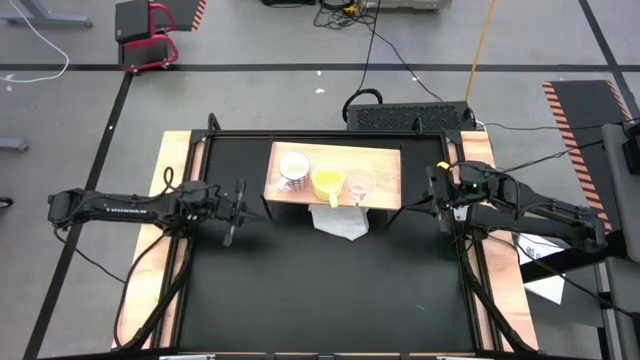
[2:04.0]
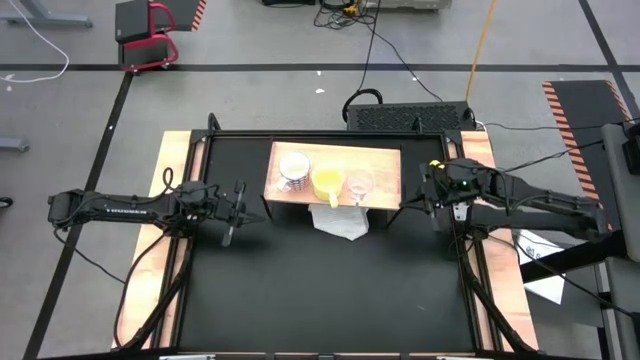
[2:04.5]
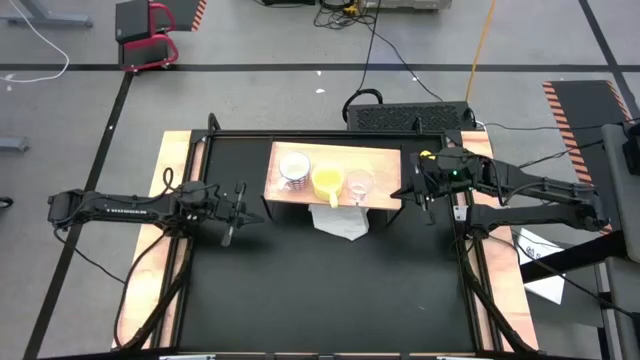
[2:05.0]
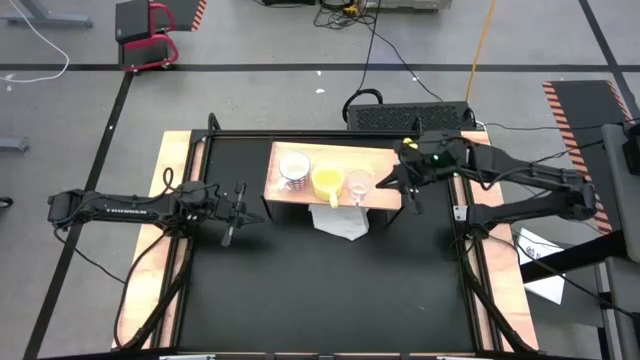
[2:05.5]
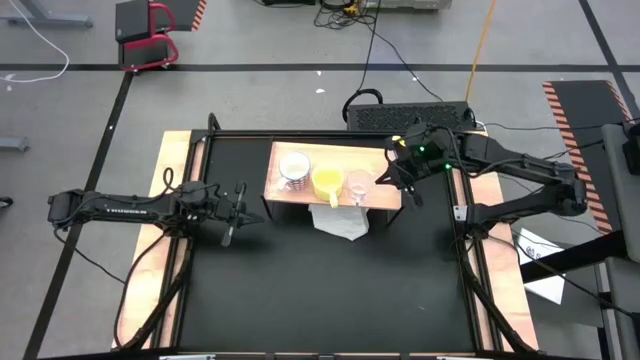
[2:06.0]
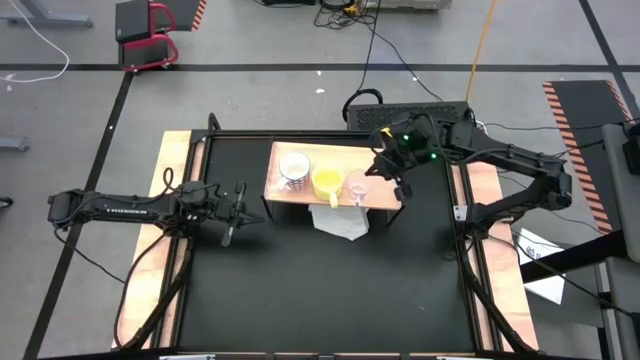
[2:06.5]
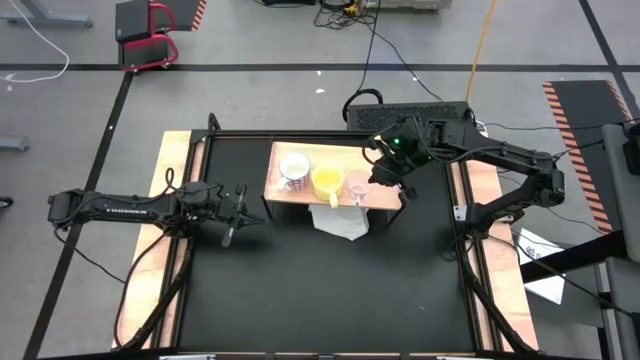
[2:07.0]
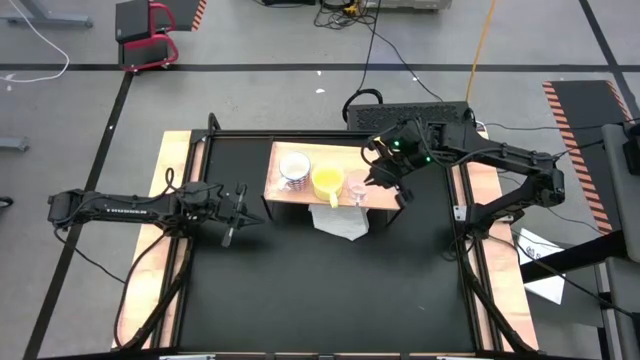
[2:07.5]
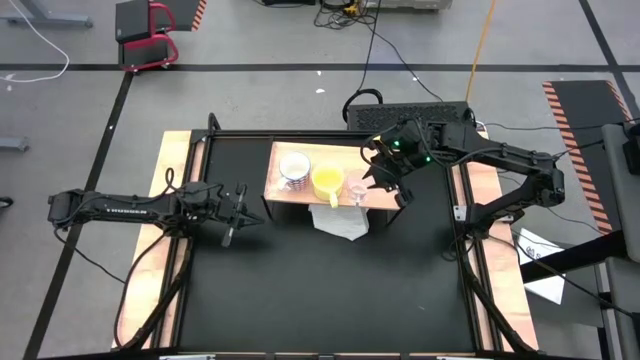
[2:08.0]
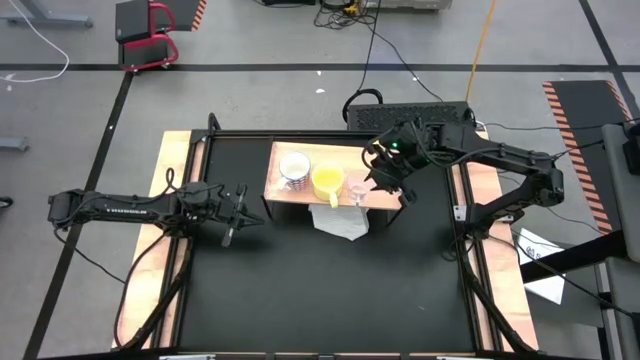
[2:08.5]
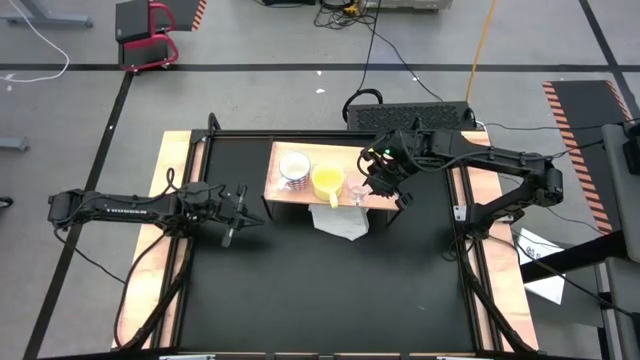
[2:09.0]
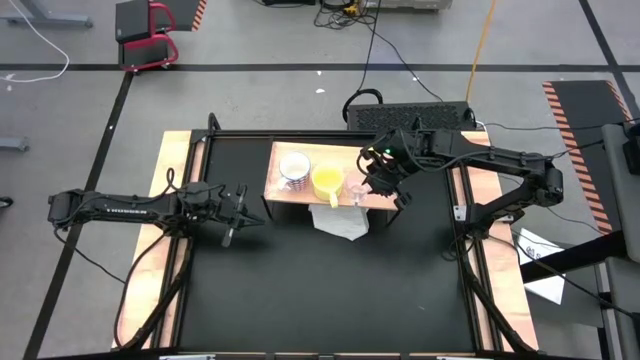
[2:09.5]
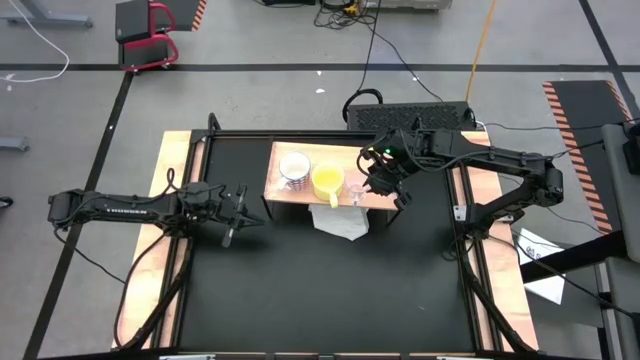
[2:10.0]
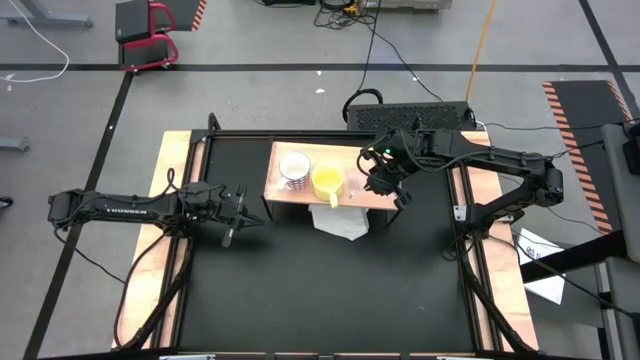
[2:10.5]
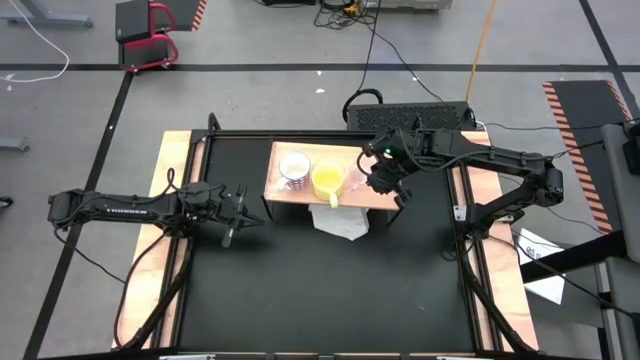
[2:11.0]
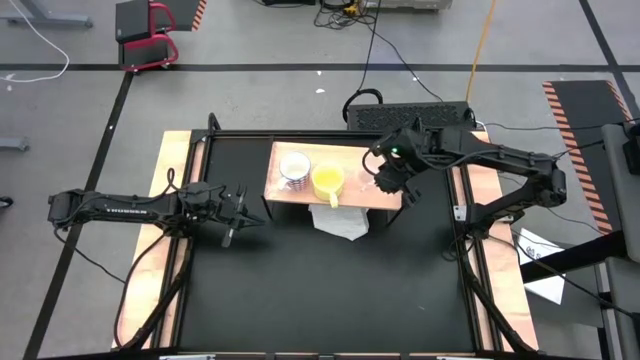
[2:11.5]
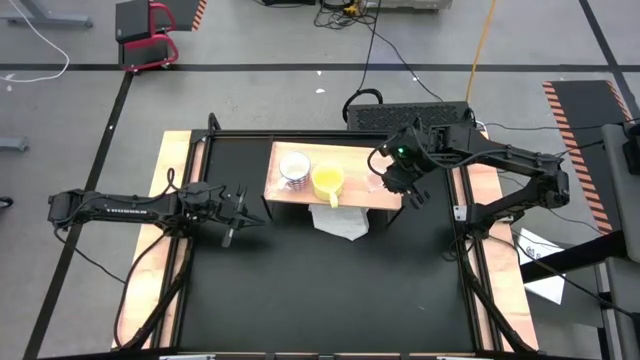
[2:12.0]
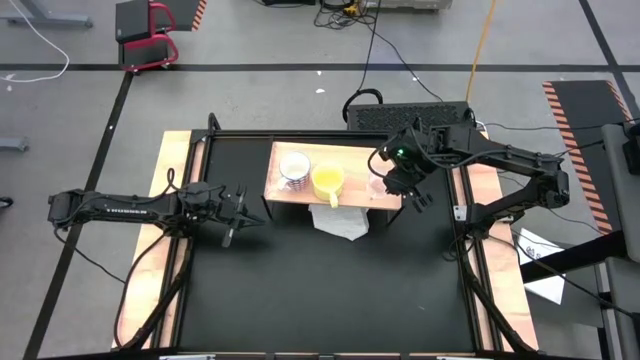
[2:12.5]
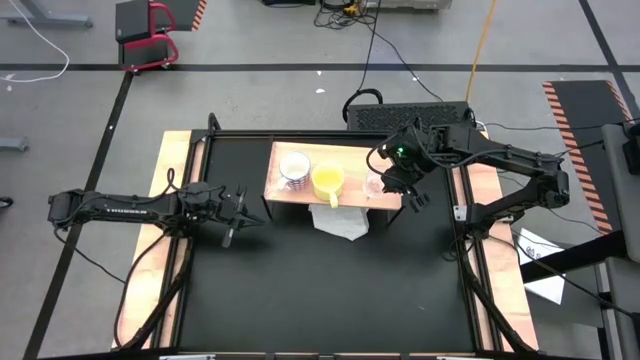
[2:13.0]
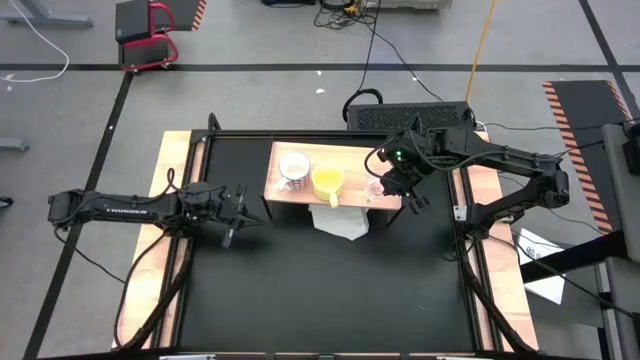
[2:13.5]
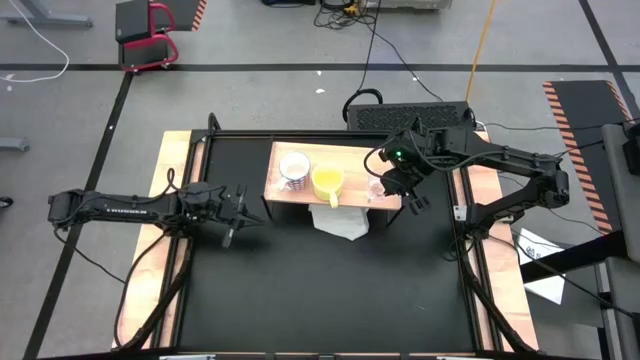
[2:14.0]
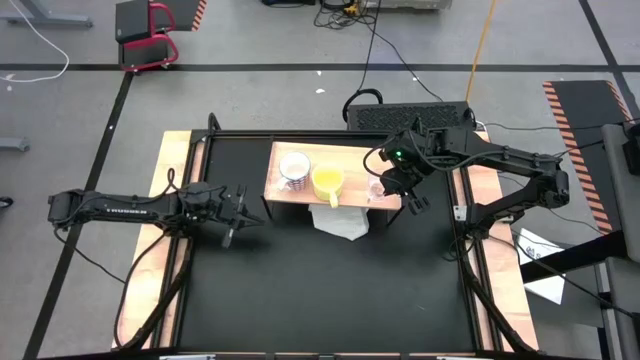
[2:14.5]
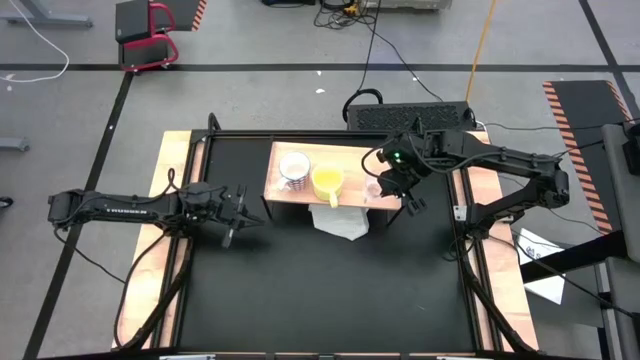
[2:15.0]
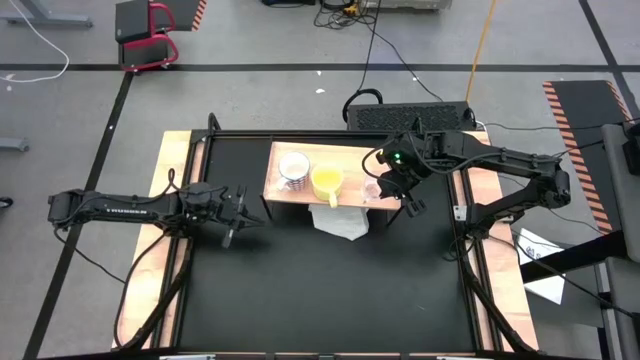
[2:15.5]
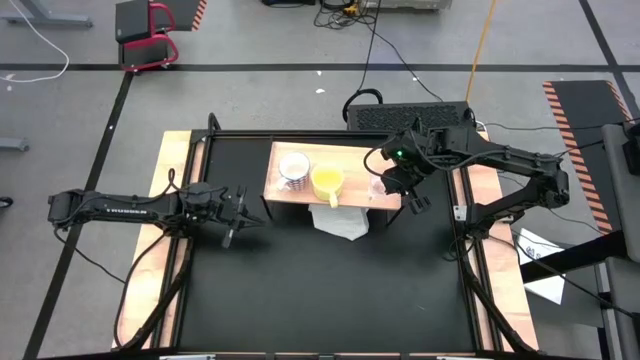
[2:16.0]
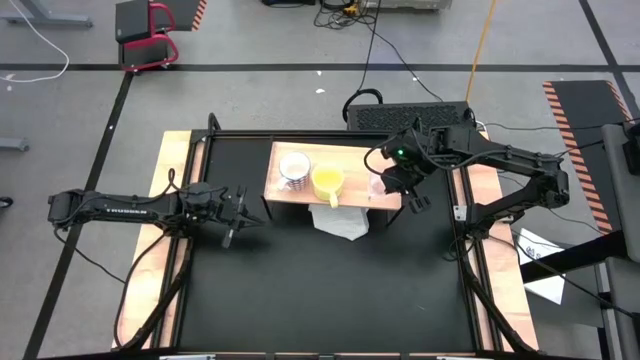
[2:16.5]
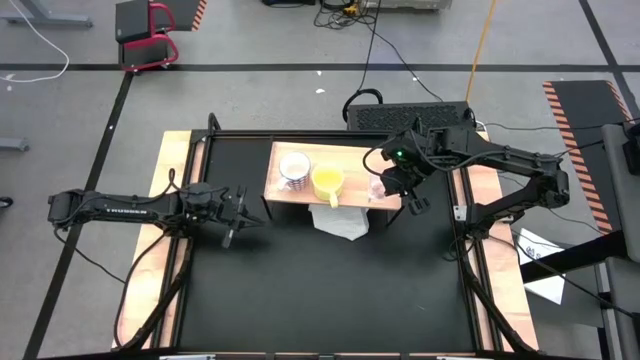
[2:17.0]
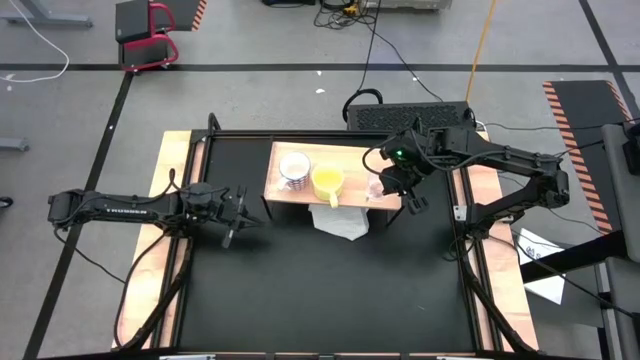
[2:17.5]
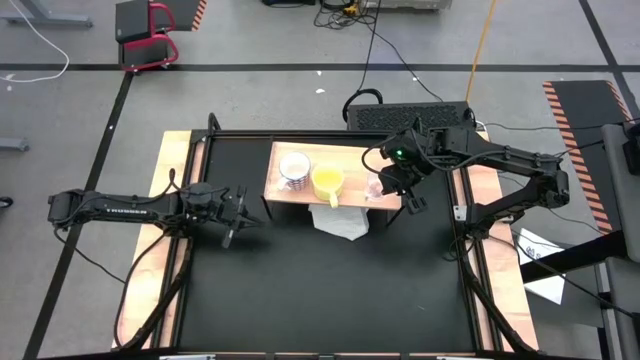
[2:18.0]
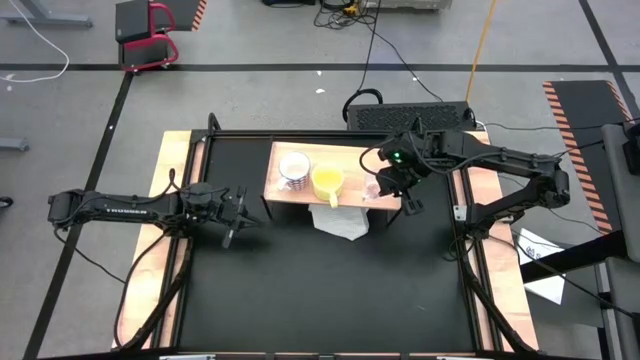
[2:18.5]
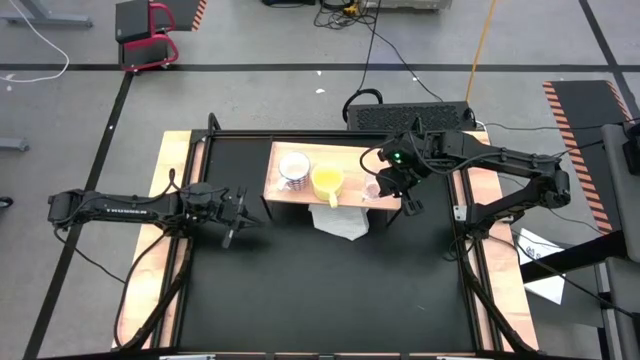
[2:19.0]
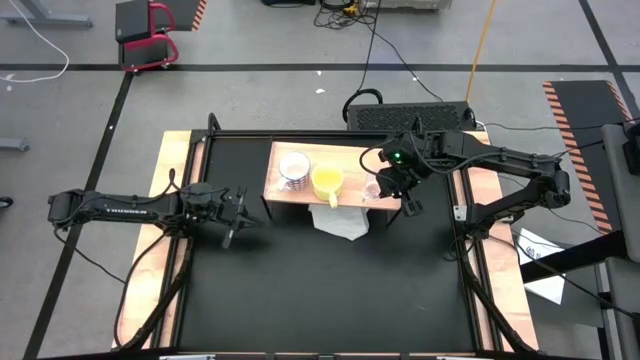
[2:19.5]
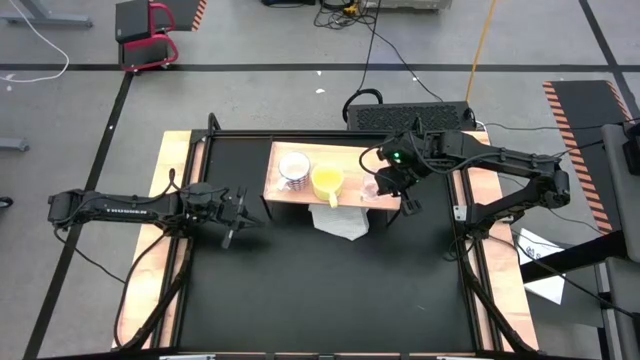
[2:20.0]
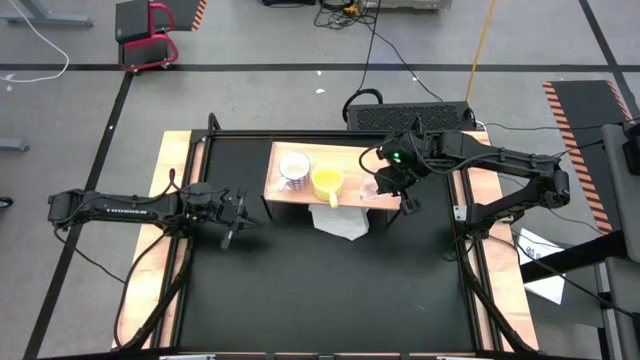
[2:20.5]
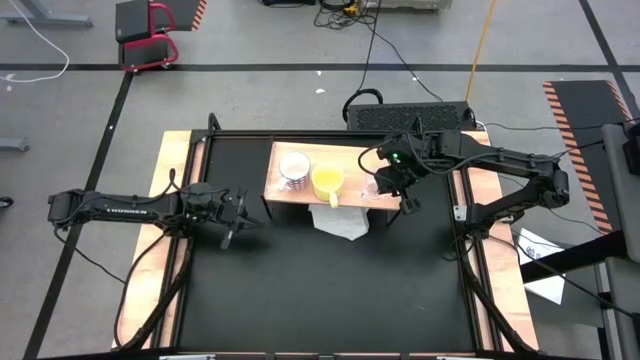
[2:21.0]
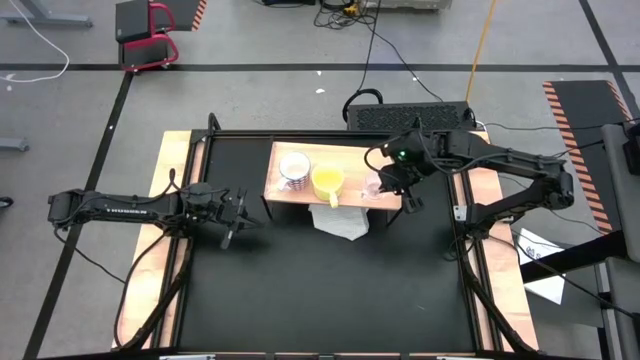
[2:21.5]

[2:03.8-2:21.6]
Task: Stack small to large cups/mugs on shelf
Put the transparent mug on the shelf

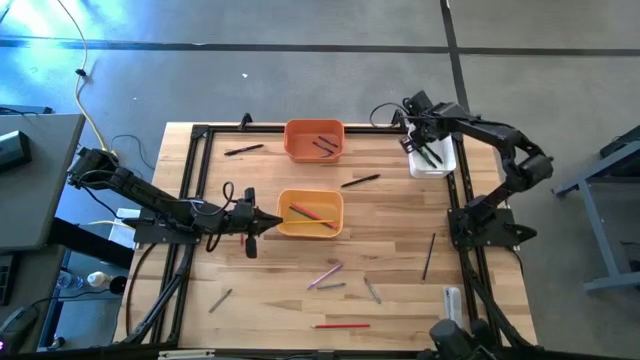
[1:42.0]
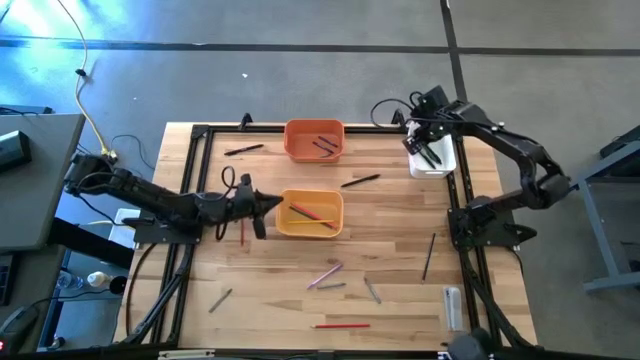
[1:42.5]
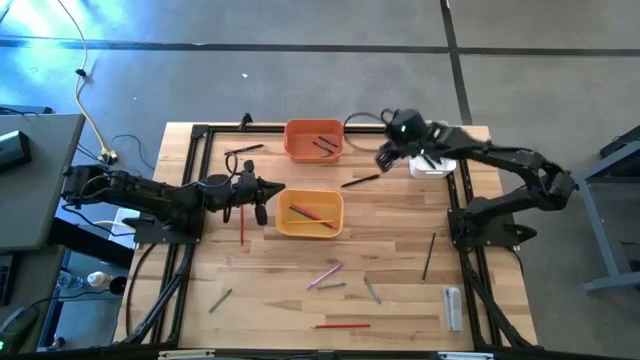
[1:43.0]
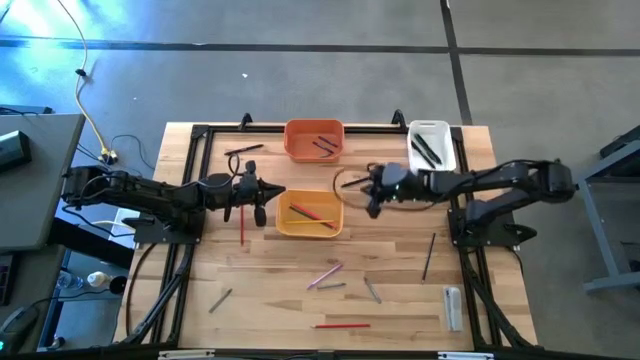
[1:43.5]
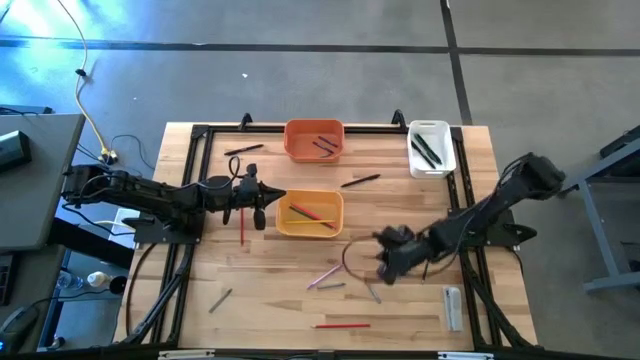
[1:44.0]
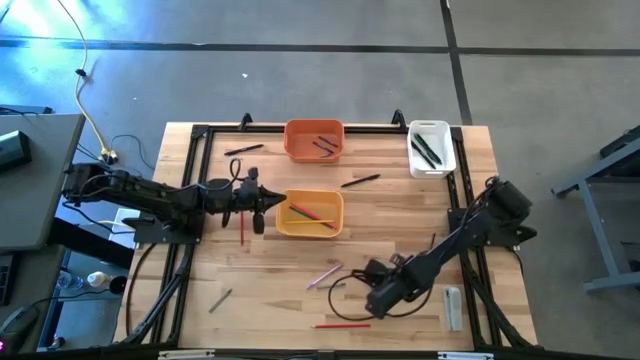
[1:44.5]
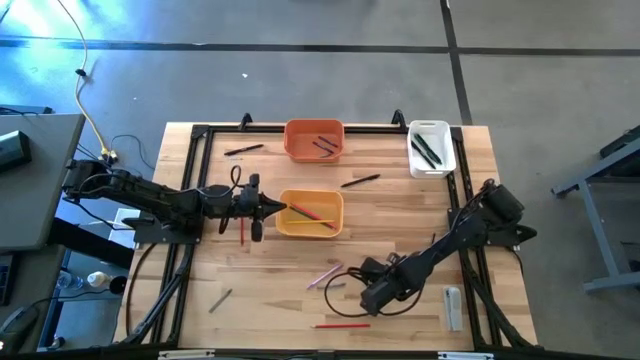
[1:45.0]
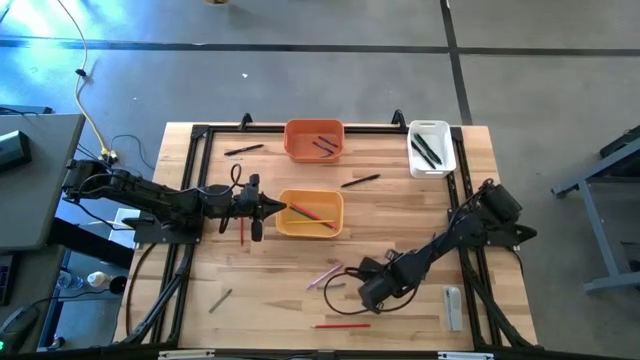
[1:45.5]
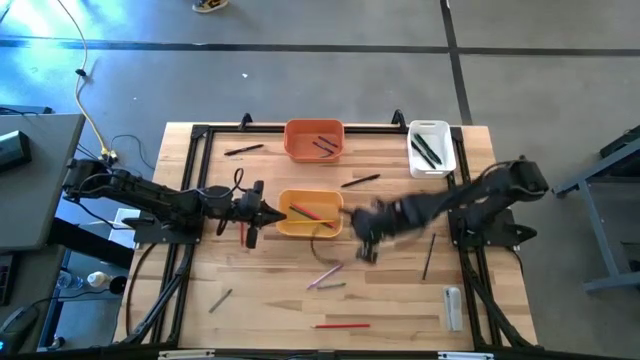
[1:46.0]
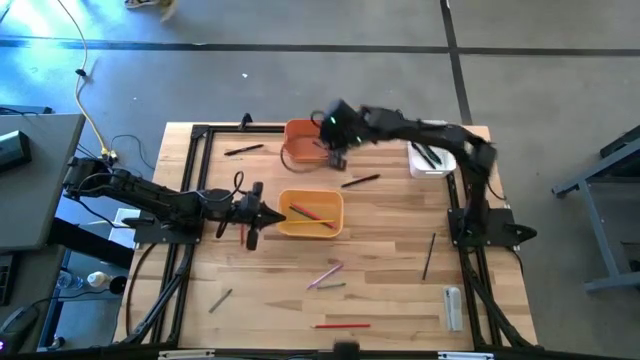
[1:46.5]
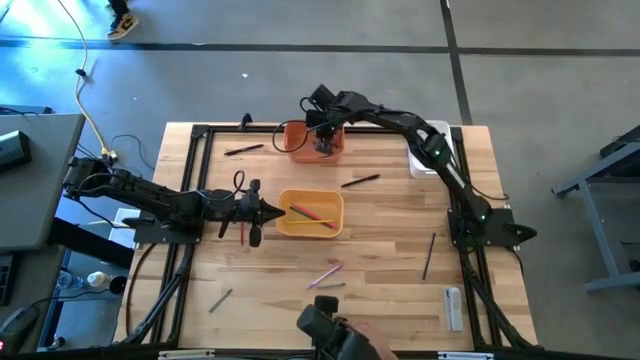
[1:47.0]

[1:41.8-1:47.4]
Task: Sort crayons/erasers/pens/pencils in bins
Put the right gray crayon into the orange bin
